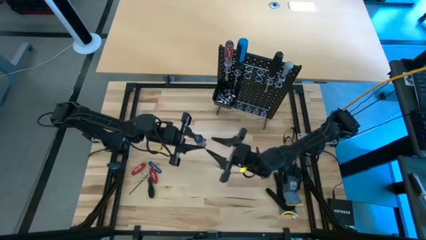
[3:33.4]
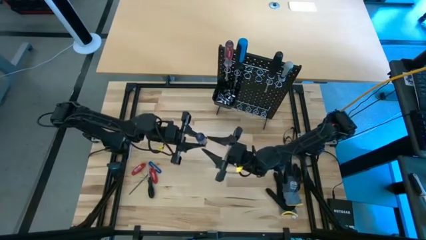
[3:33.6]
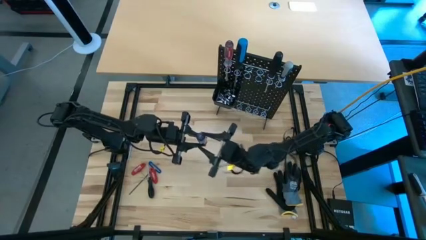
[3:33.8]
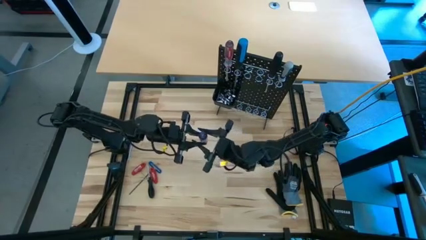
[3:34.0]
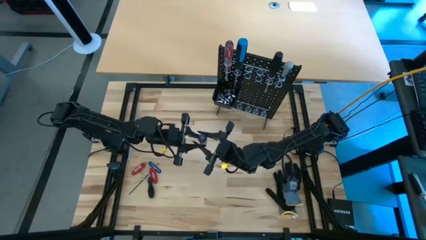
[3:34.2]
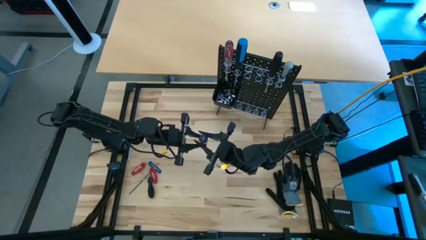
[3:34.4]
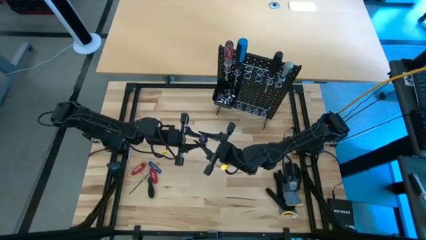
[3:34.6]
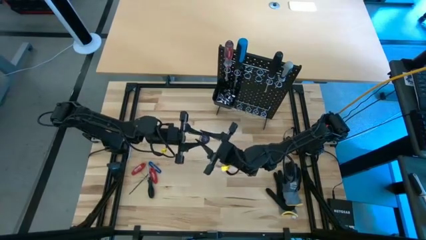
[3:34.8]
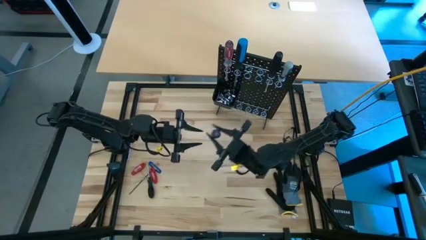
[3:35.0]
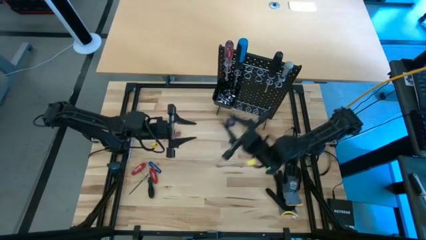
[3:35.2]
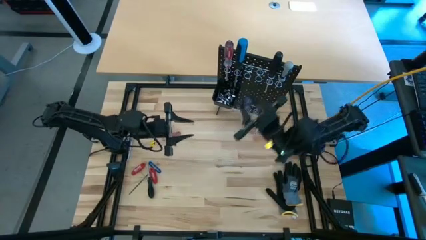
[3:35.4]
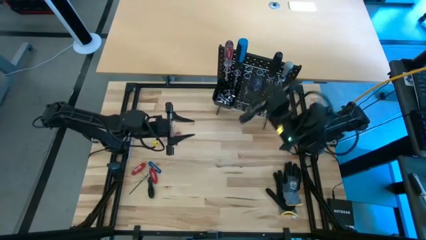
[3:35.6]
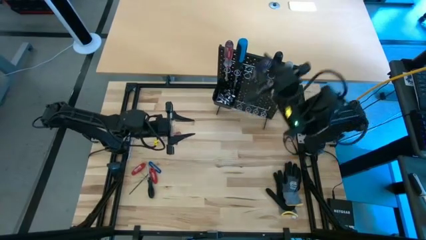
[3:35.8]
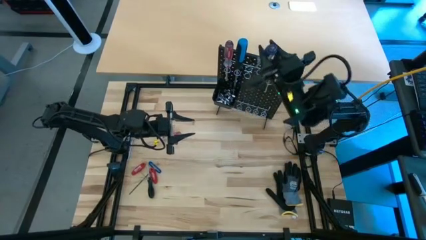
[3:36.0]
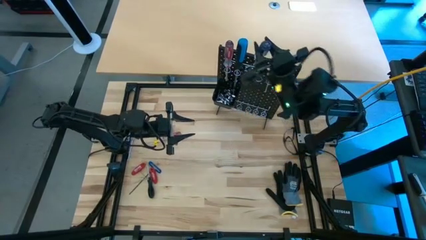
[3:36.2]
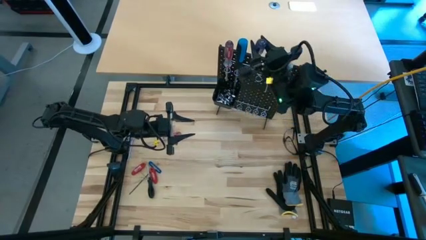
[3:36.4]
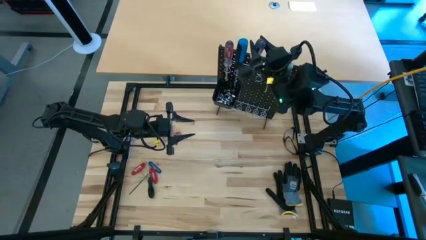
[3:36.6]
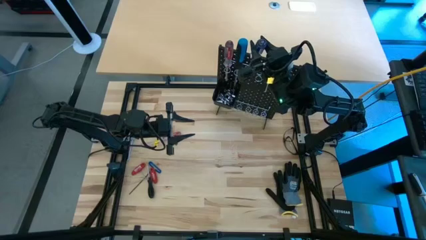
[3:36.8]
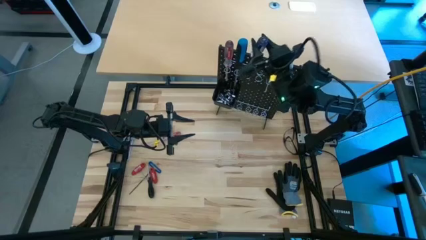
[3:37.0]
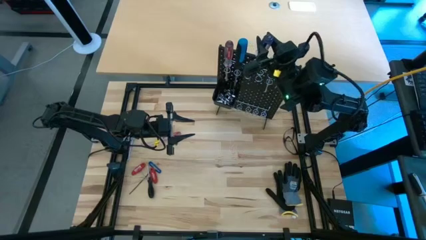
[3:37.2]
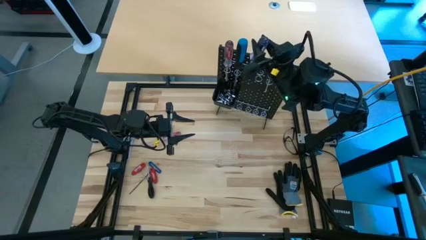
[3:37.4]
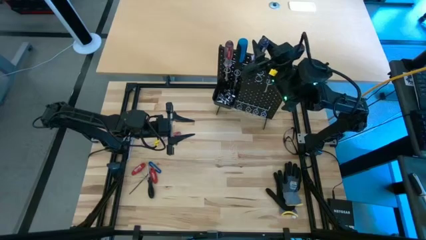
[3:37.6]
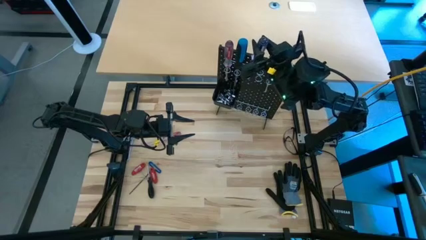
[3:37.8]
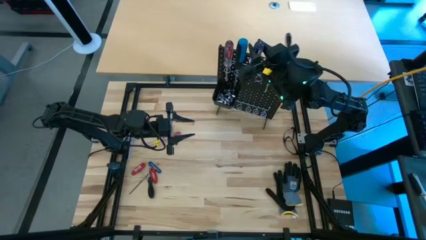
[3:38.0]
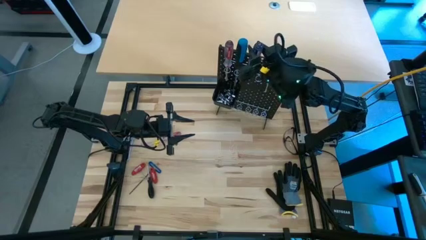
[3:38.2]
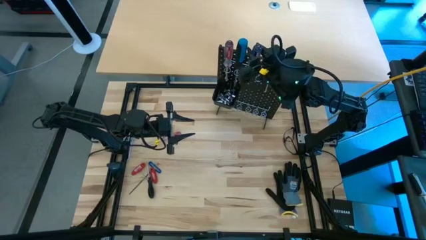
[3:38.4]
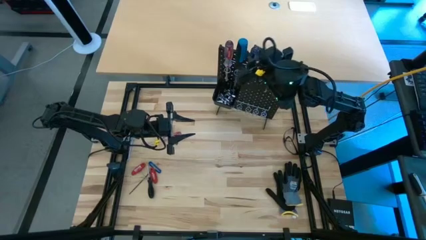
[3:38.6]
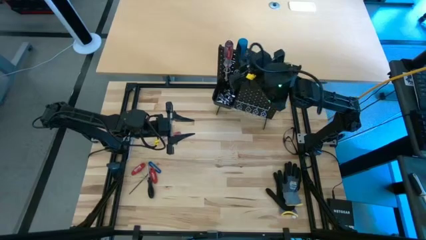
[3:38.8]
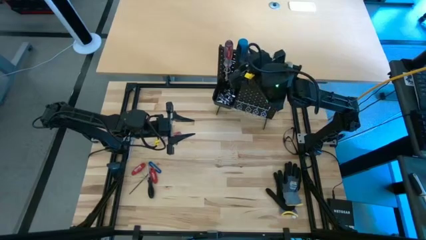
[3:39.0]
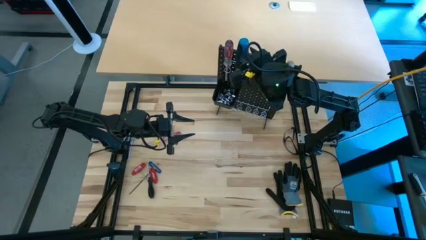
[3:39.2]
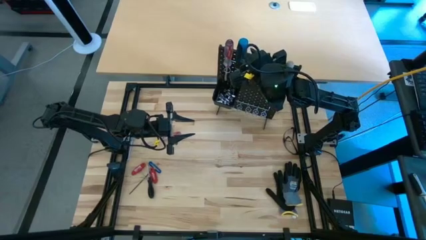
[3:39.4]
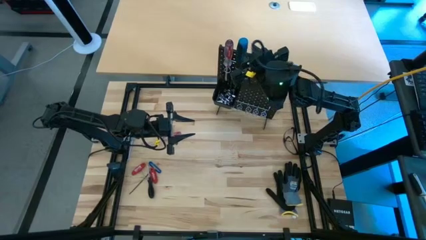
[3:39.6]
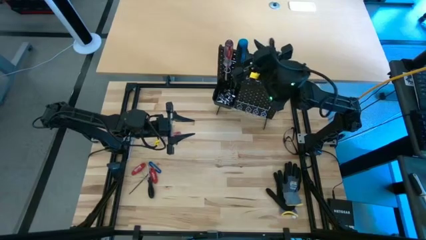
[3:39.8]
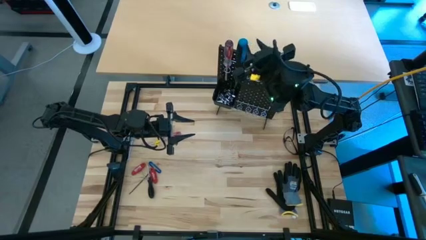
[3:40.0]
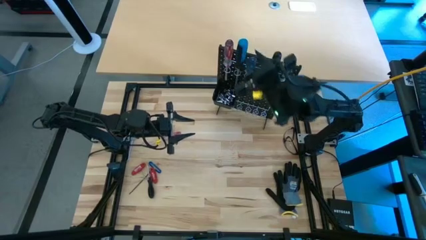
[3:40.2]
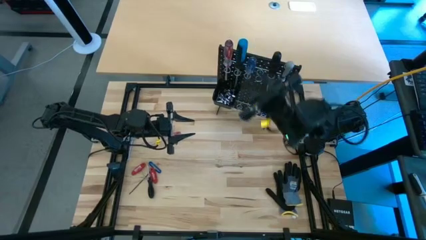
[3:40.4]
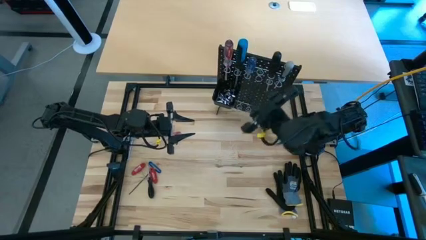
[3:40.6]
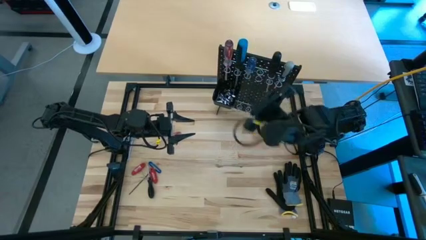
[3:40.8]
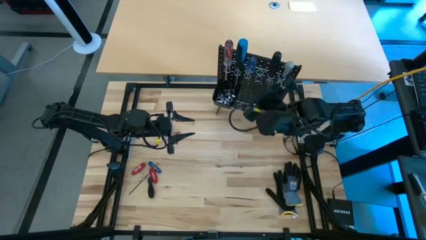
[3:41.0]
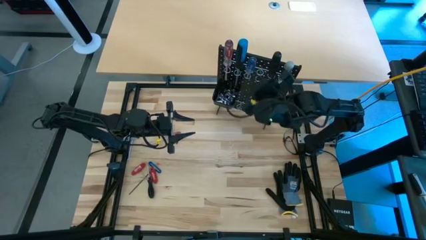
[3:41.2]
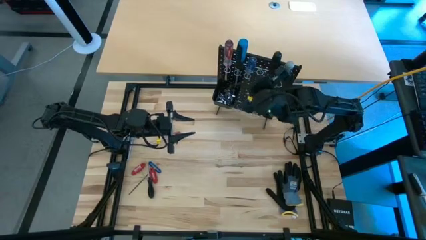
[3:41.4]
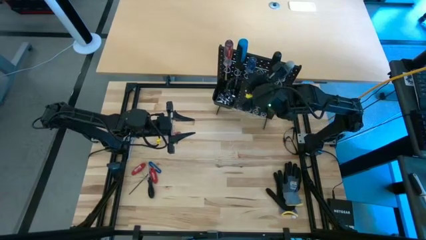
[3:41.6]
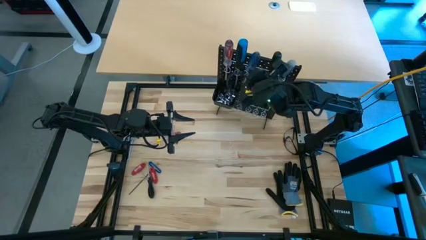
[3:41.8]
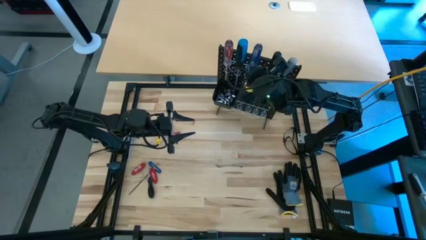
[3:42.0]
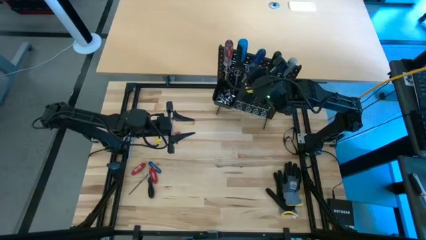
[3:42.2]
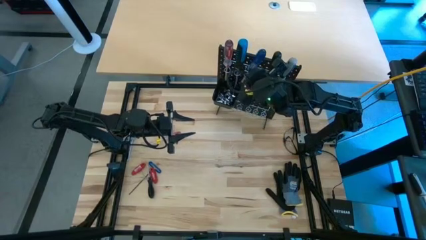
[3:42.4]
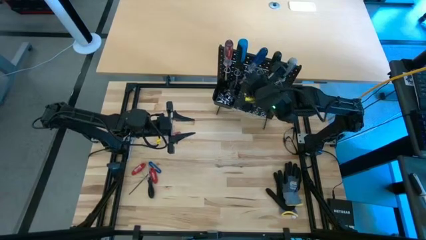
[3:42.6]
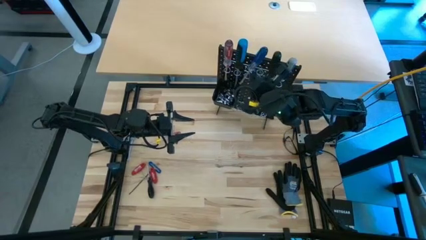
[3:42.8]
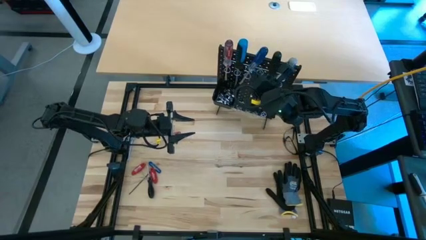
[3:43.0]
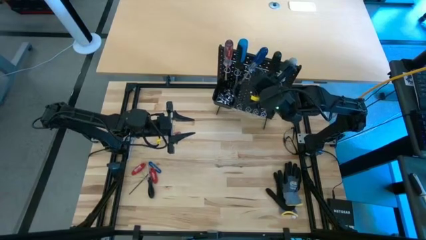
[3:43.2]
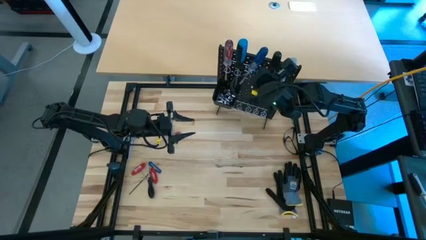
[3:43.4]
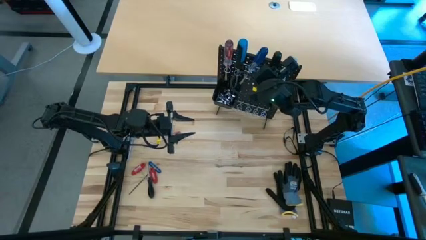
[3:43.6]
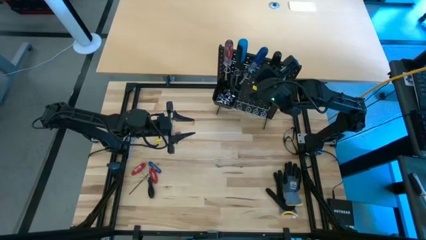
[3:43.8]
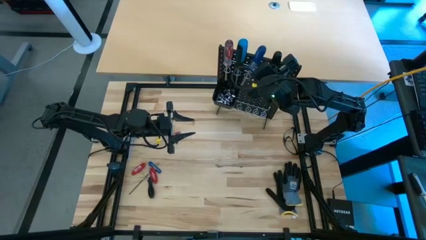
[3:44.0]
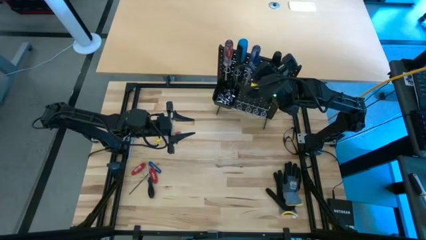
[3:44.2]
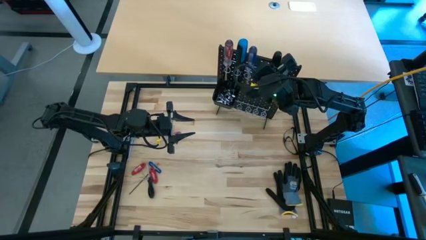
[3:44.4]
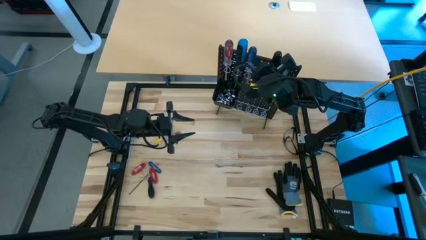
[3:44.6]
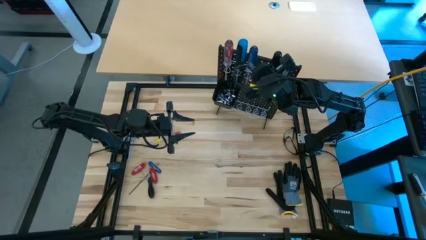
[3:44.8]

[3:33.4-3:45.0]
Task: Hang tools onto peg board
Hang the blue screwdriver on the black pegboard
